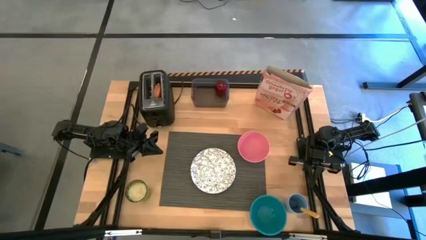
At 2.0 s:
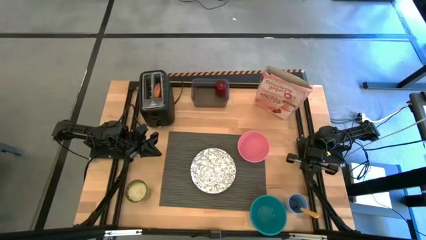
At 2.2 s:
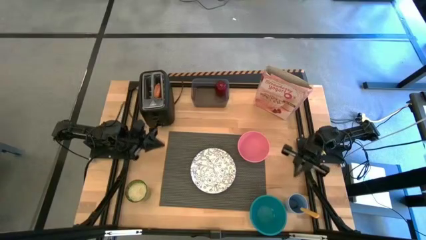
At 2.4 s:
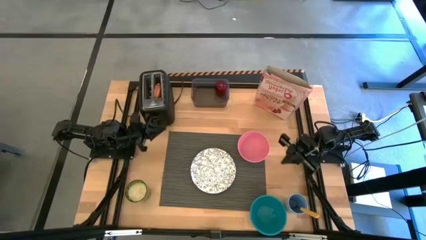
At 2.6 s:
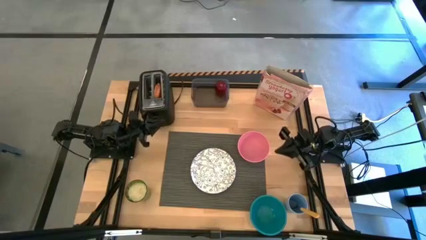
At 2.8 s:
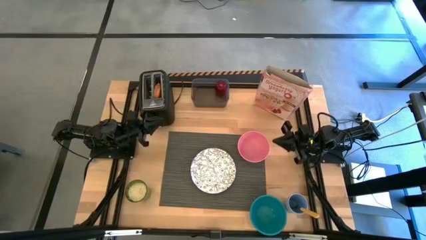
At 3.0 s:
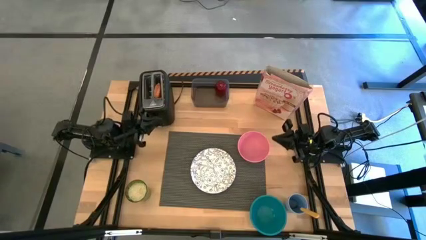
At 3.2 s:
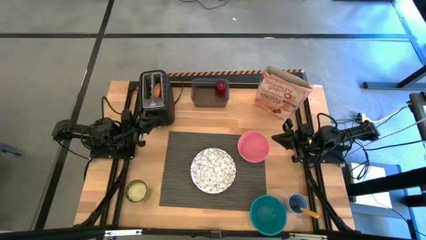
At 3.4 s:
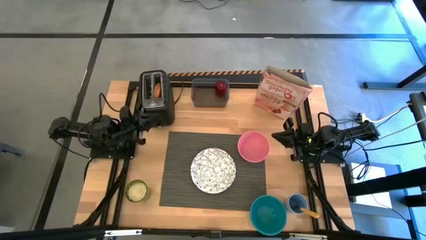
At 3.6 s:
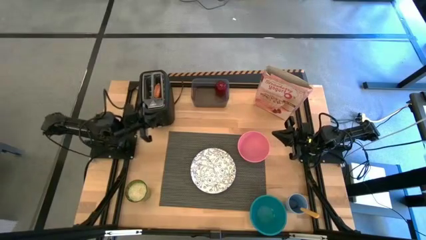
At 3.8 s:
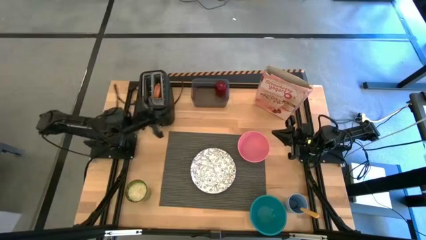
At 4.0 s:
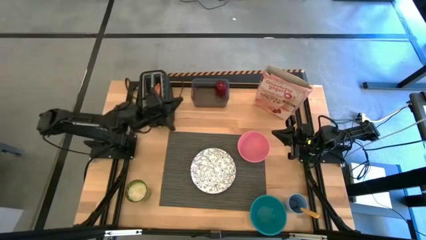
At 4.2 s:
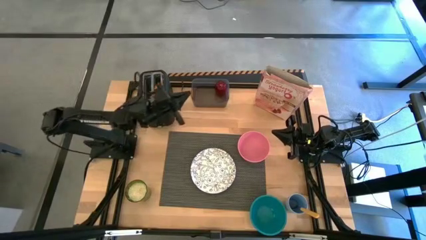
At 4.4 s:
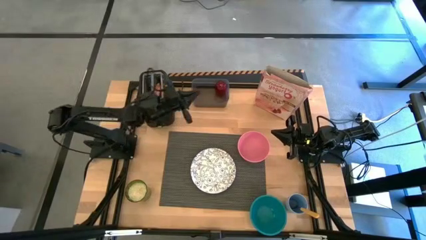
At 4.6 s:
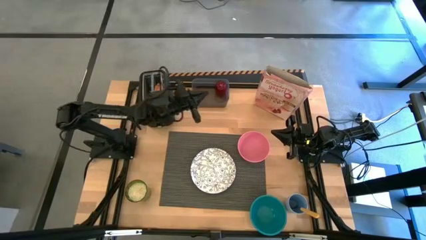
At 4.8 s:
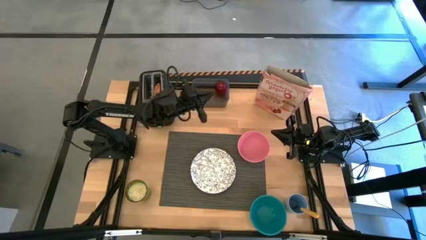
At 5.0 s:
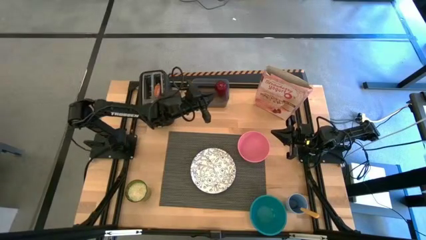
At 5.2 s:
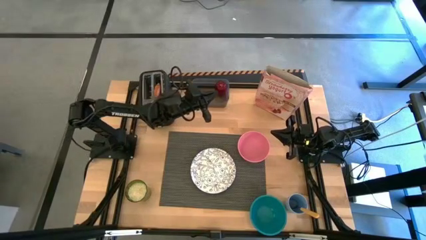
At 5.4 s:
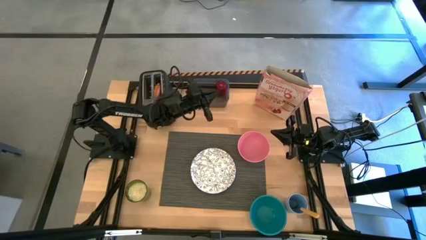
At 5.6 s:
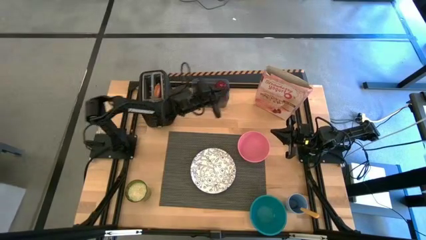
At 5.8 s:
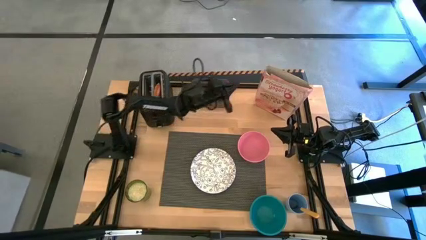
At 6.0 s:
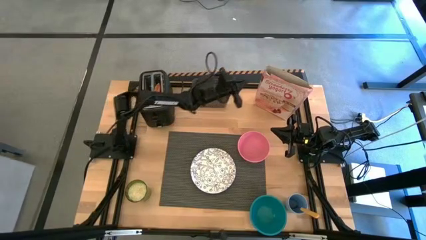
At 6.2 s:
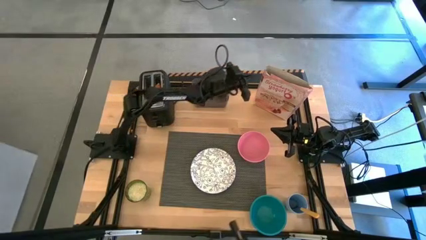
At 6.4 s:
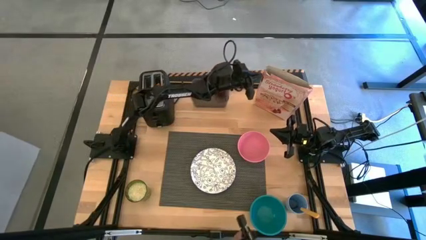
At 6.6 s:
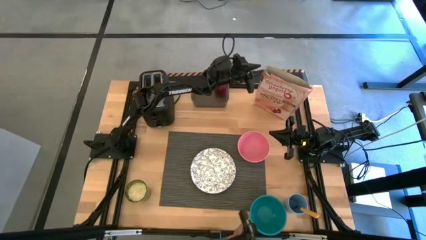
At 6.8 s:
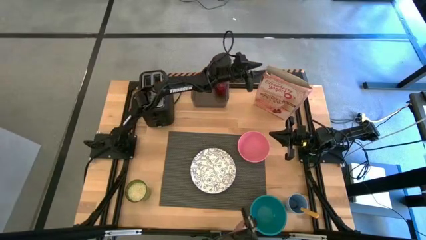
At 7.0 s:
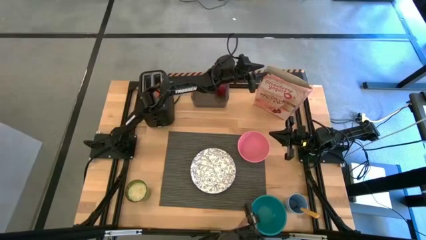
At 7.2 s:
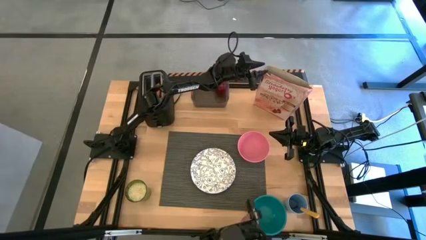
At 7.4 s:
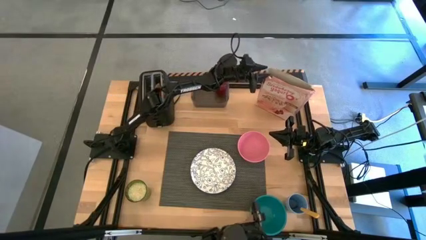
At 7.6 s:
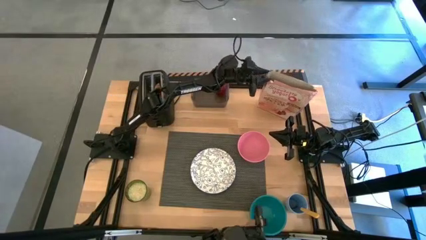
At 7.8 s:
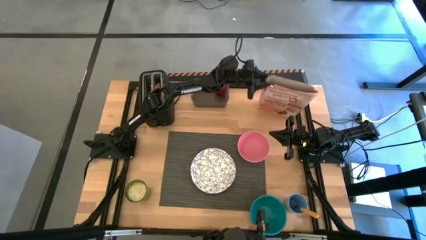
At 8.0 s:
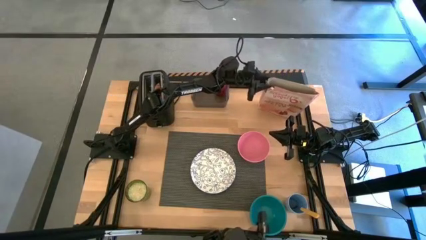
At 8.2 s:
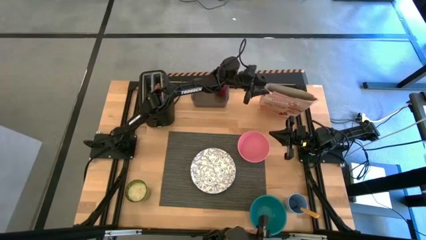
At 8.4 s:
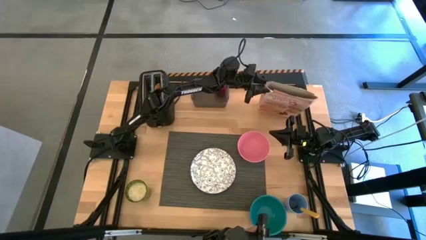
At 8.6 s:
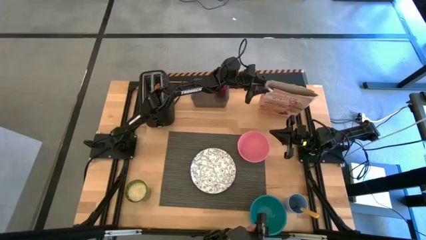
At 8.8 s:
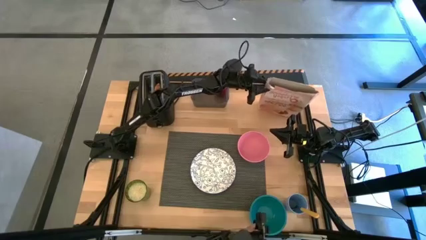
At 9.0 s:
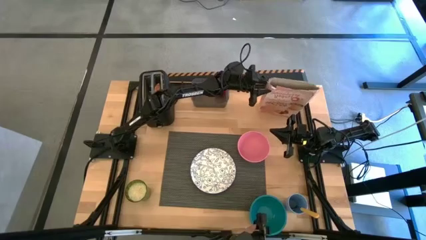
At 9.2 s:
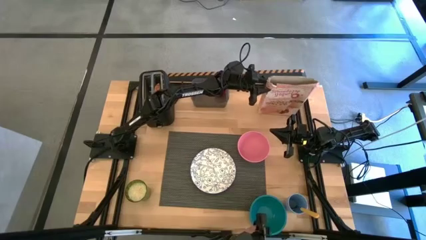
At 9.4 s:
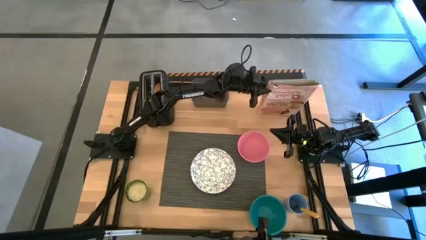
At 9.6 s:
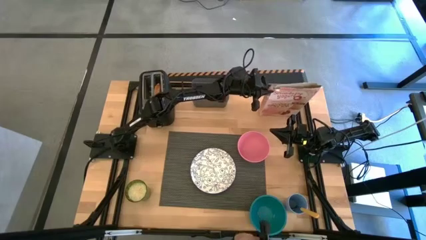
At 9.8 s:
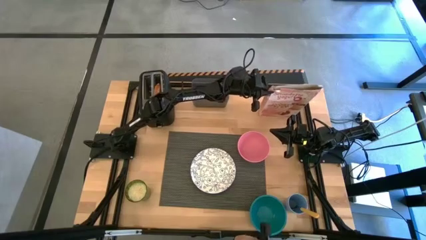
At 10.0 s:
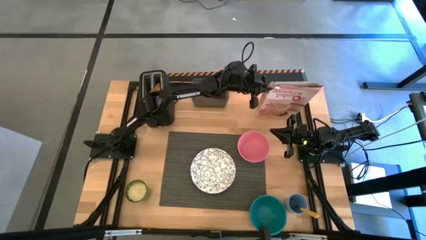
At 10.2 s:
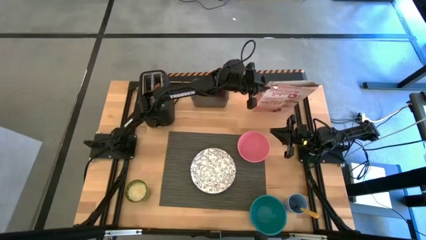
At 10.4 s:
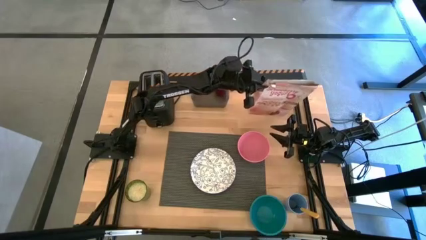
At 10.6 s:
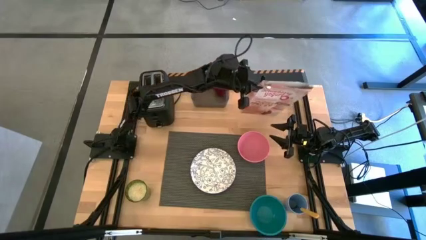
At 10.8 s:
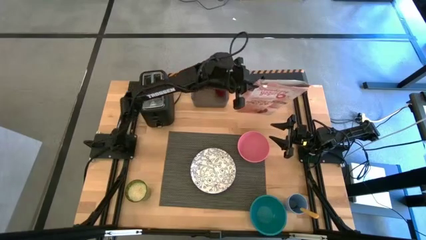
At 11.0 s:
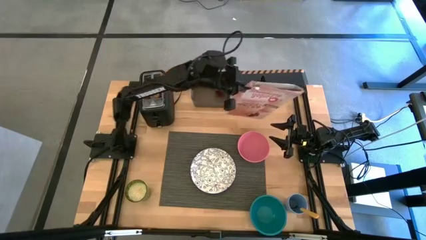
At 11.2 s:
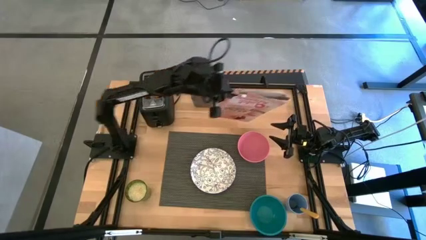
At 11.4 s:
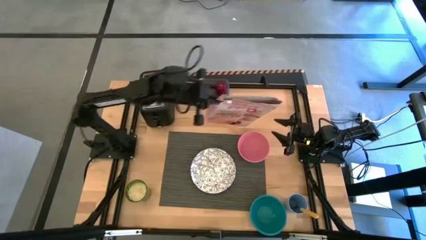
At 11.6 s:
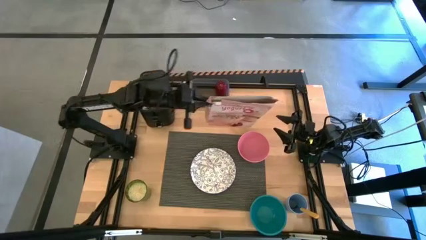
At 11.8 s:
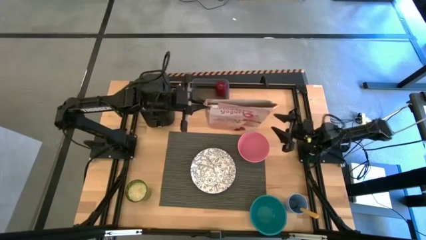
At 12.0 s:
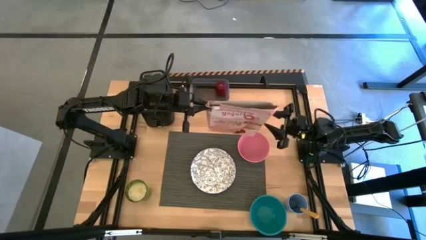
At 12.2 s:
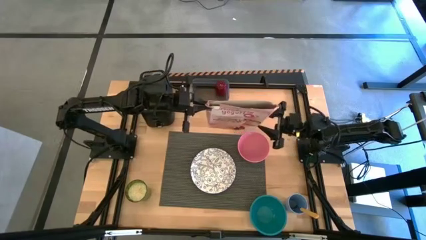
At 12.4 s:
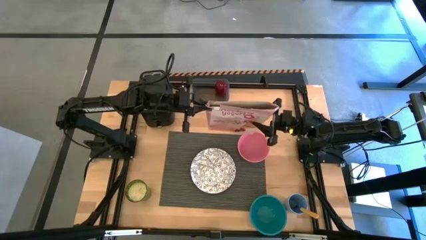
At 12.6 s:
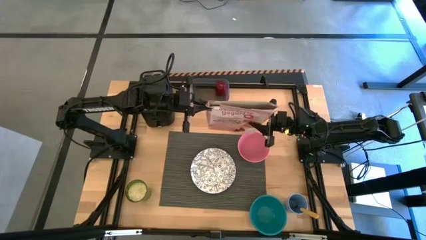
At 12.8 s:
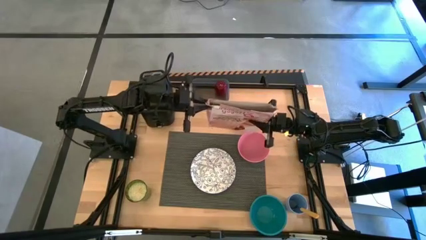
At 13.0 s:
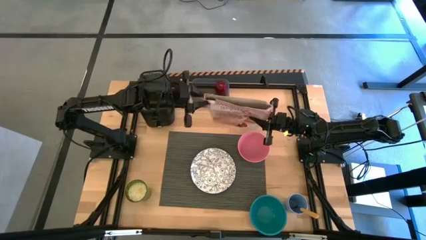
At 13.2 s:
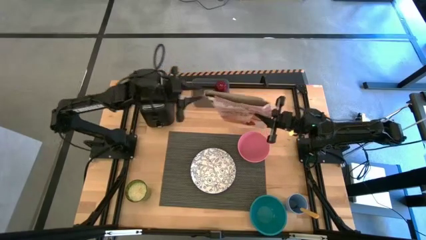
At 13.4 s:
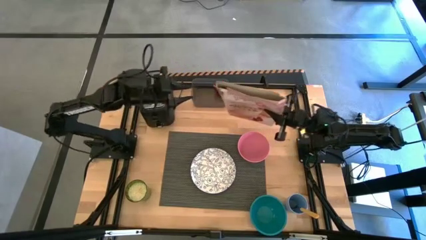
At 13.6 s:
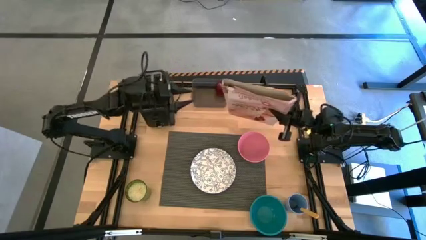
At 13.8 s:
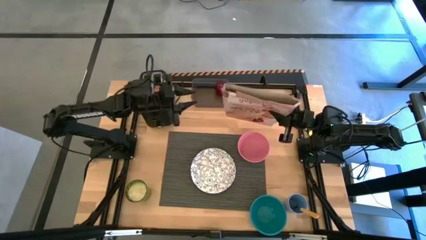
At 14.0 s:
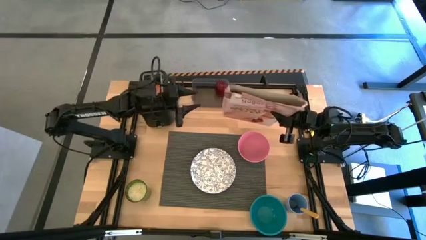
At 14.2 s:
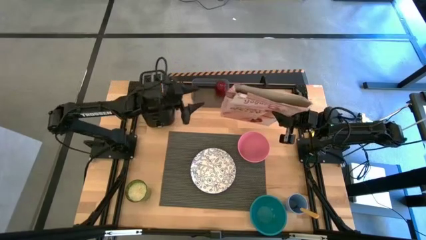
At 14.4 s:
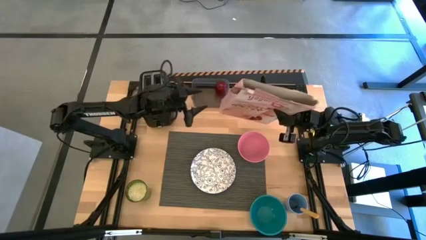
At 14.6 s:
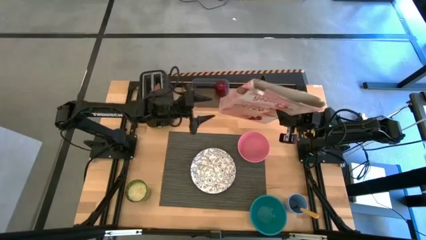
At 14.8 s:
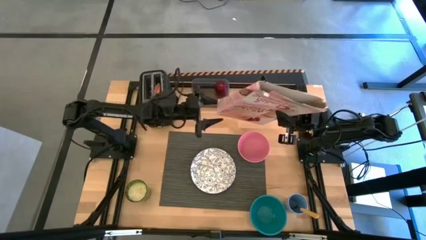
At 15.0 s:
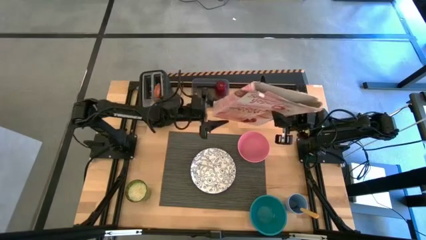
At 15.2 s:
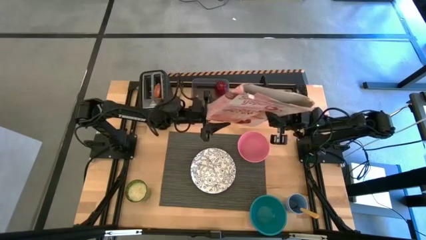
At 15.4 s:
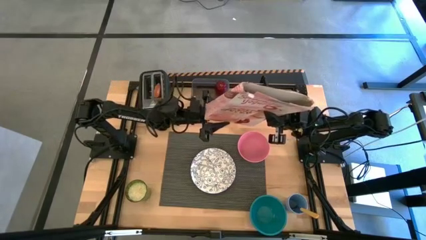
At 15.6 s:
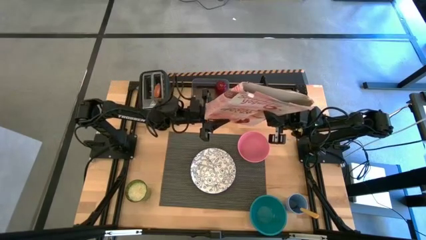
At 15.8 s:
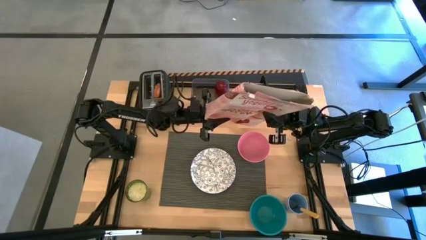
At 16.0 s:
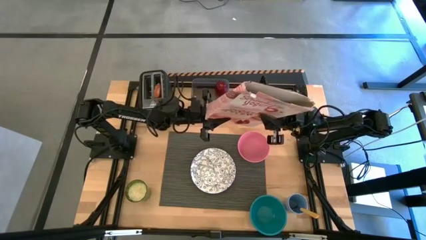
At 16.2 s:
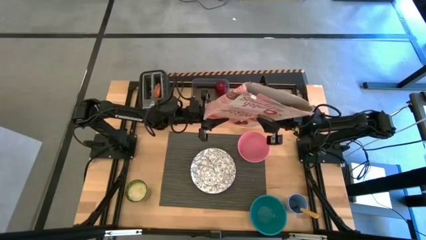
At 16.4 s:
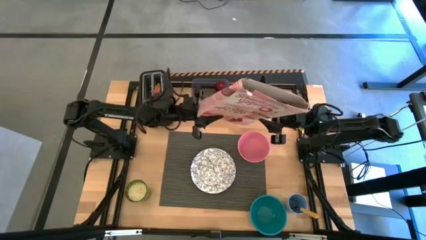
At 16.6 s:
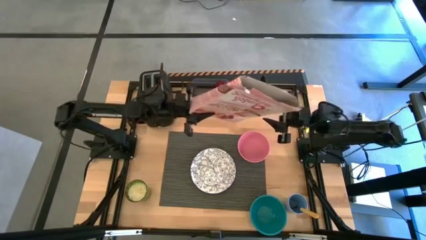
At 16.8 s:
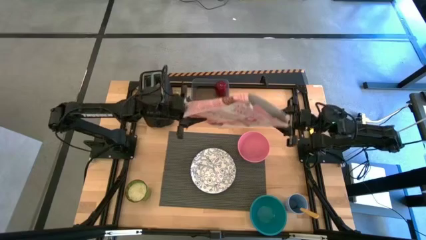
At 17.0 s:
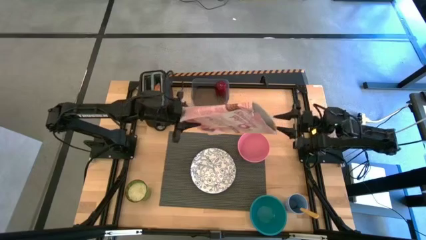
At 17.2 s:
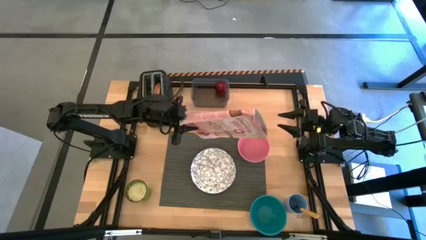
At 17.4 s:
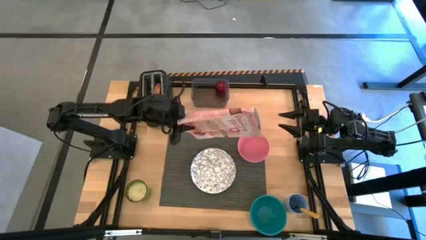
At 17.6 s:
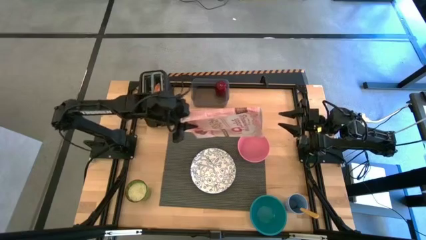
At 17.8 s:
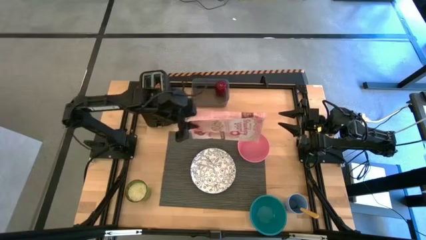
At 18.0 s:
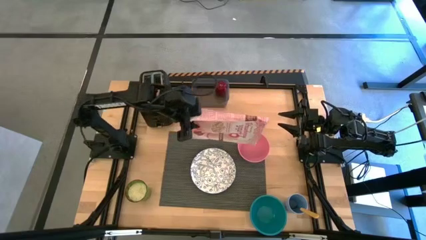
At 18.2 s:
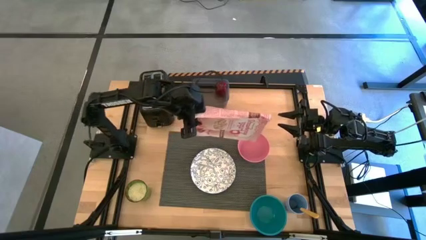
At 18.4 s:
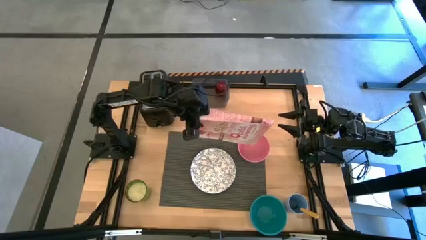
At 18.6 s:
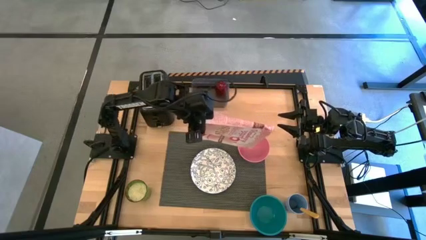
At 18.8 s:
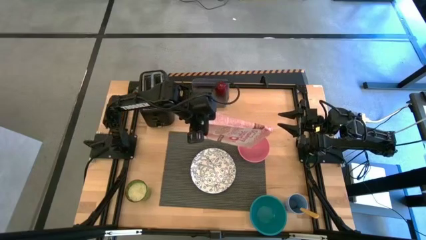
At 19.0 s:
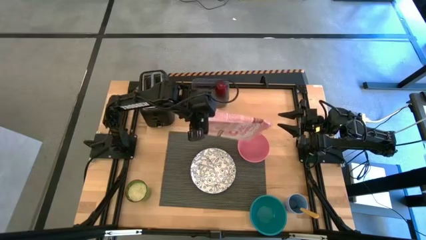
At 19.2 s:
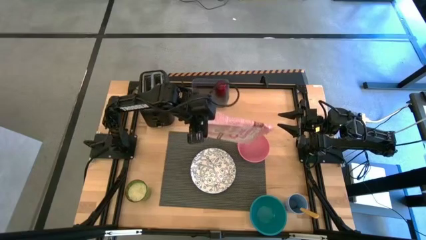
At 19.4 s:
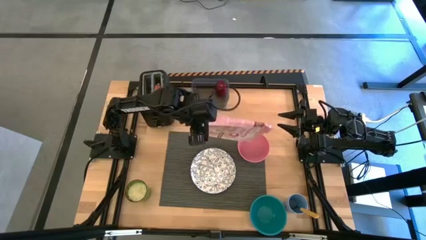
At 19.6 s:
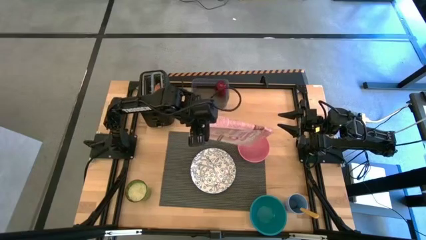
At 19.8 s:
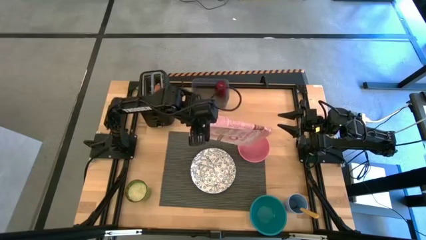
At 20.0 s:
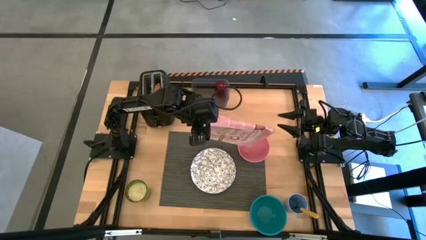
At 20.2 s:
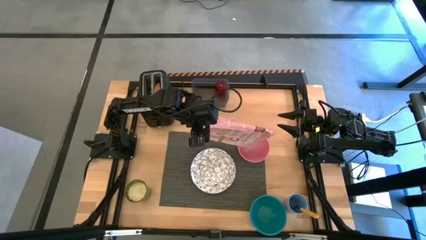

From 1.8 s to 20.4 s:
Task: Arrange a breakfast setting
Pour the cereal box into the pink bowl
